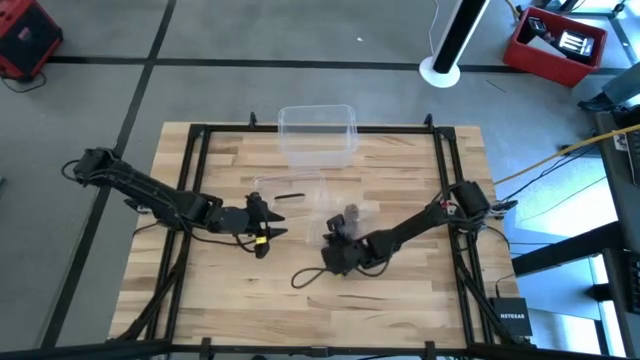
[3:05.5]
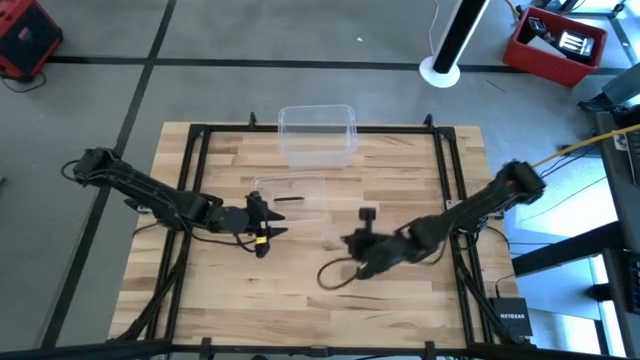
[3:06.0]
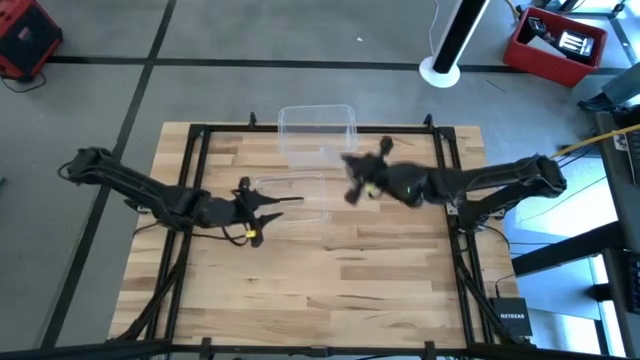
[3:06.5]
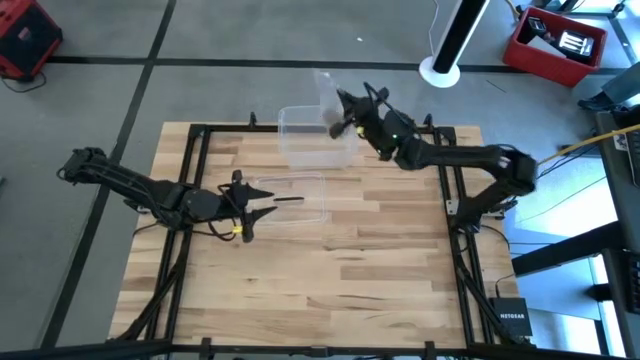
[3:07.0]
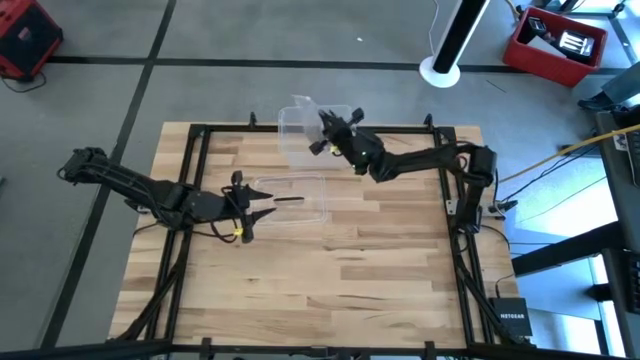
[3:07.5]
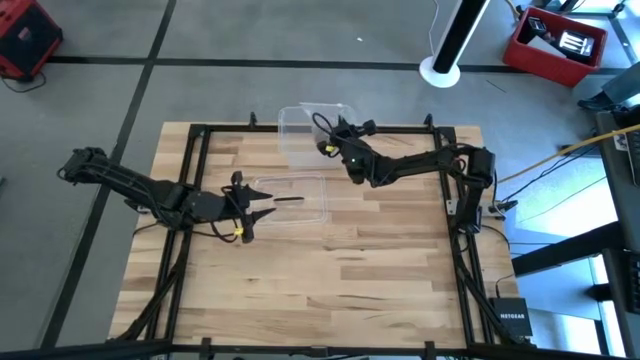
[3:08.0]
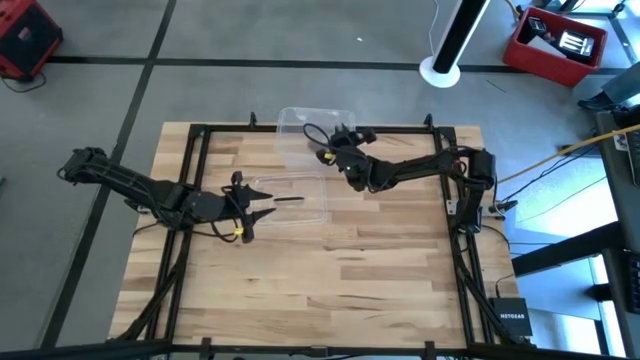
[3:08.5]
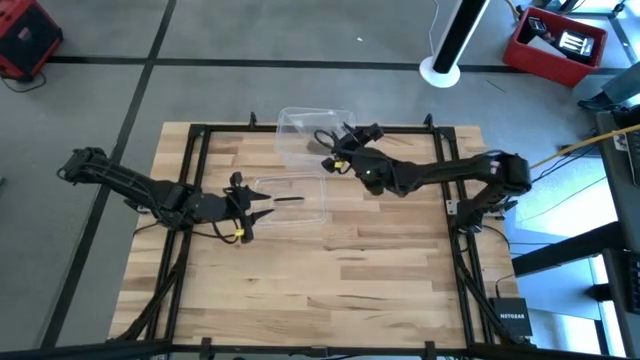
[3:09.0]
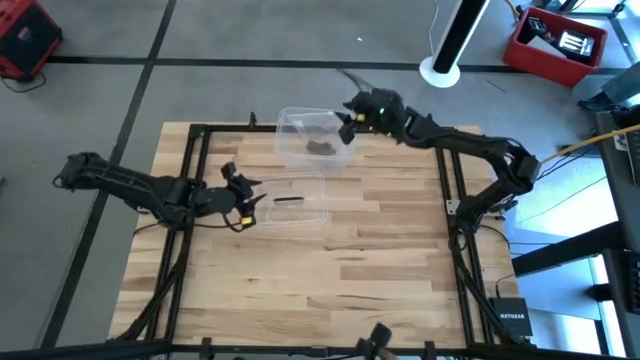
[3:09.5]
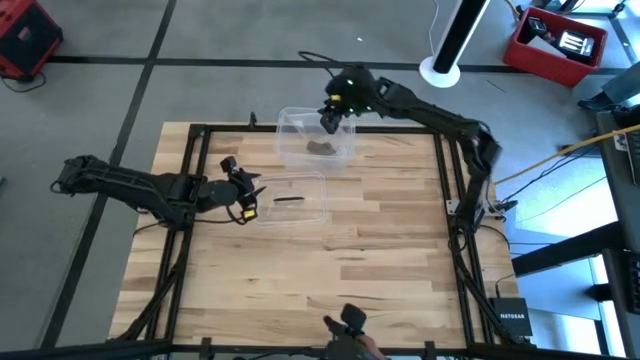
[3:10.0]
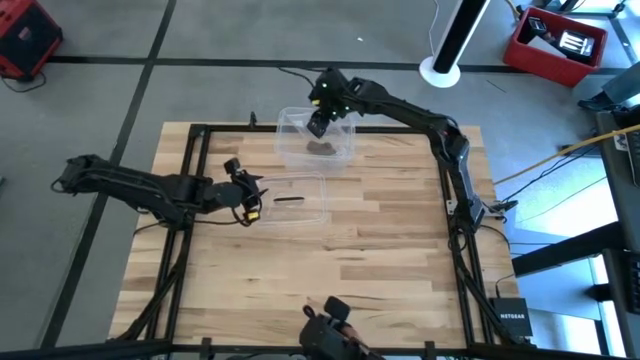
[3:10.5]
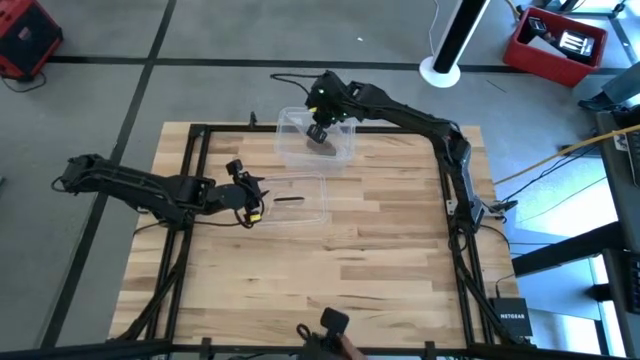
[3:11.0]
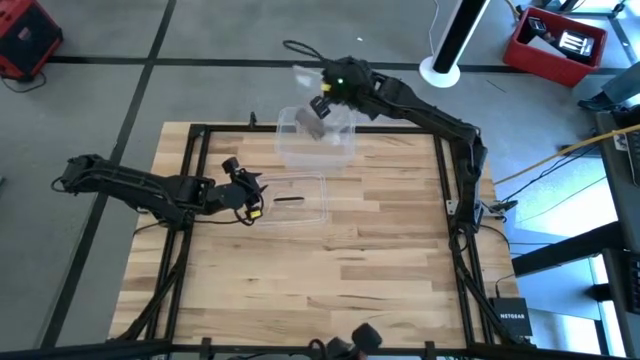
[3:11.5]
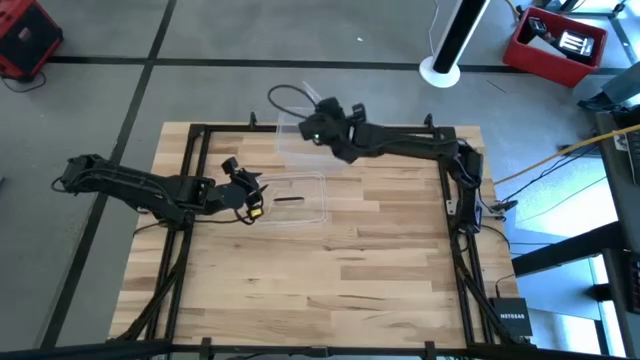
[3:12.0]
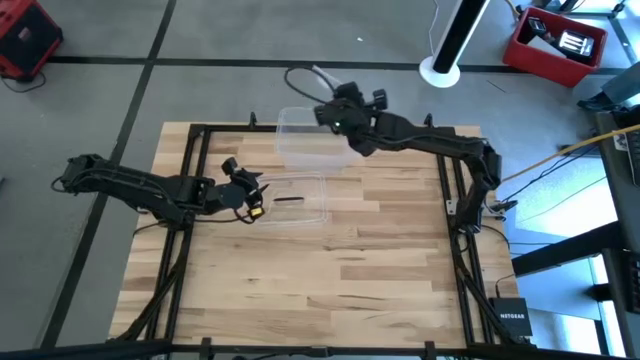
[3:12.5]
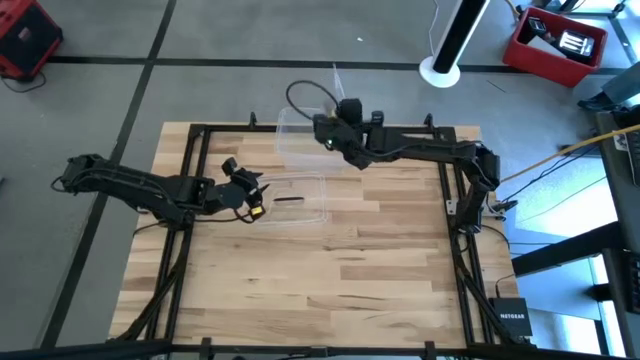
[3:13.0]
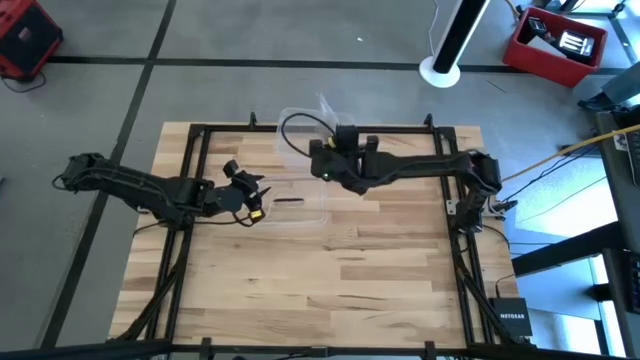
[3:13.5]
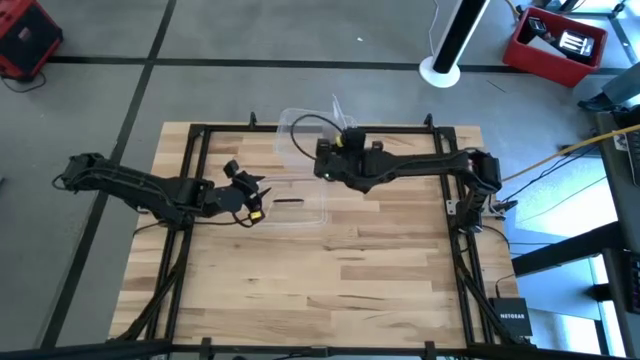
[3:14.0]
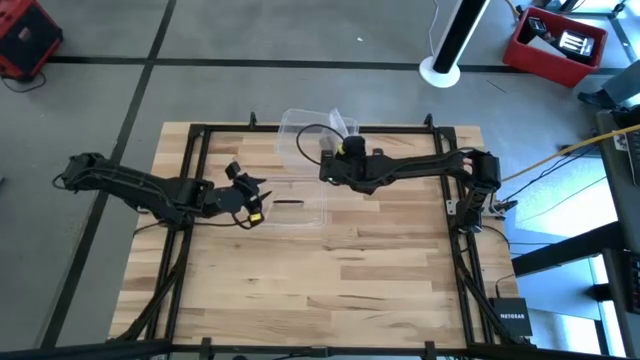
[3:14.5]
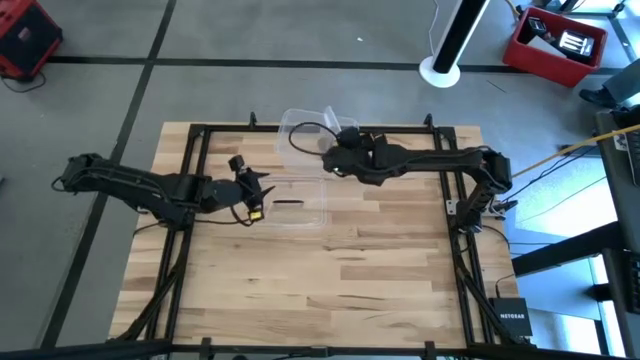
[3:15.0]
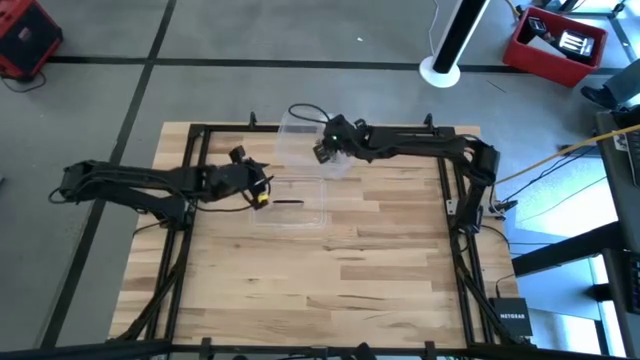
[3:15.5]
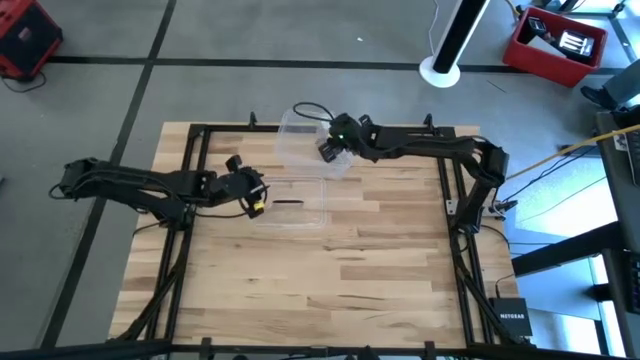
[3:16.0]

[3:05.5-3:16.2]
Task: Roll bandage
Put the transparent zip bag containing the rolled brown bandage into the transparent container

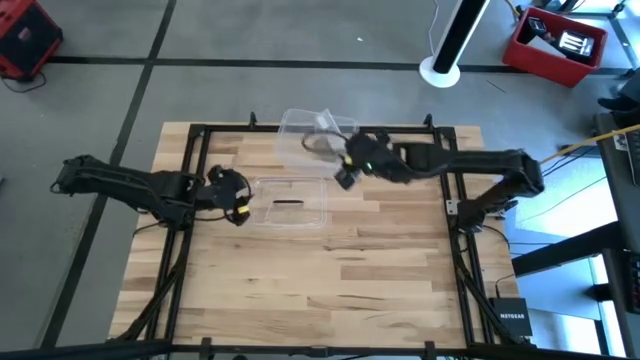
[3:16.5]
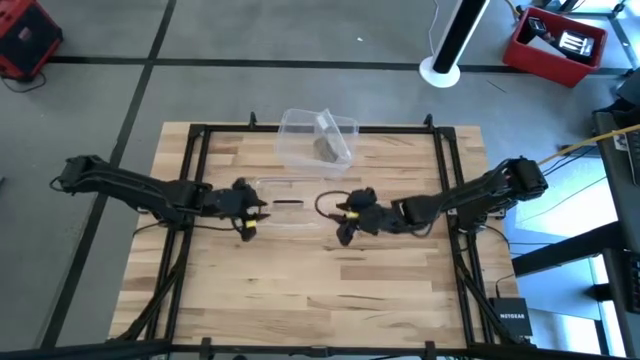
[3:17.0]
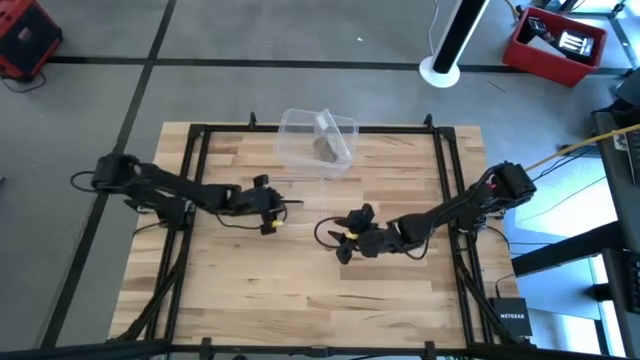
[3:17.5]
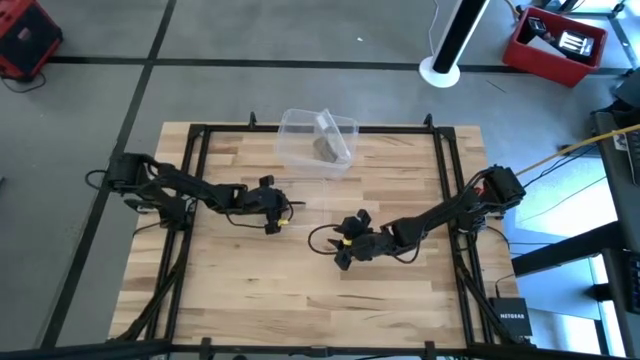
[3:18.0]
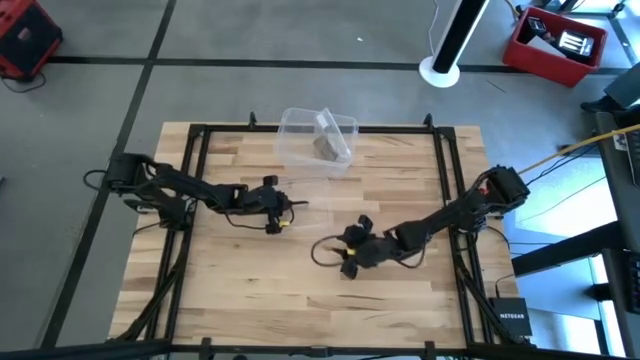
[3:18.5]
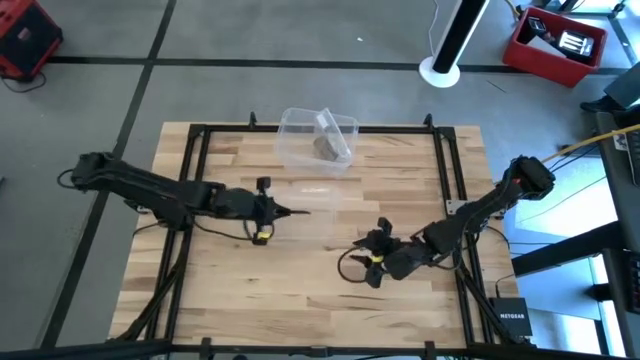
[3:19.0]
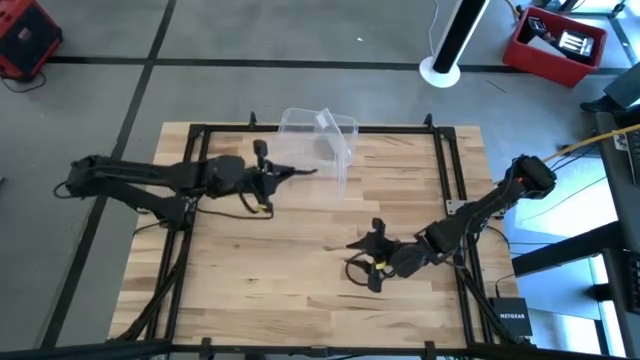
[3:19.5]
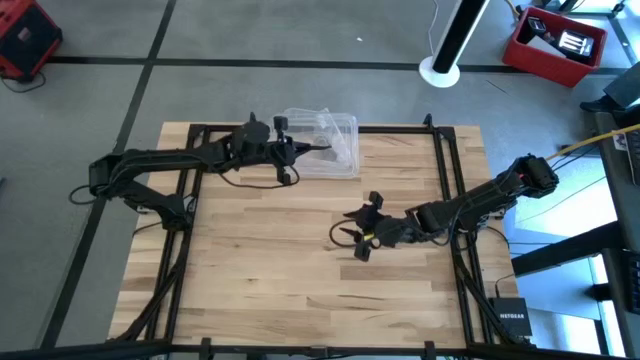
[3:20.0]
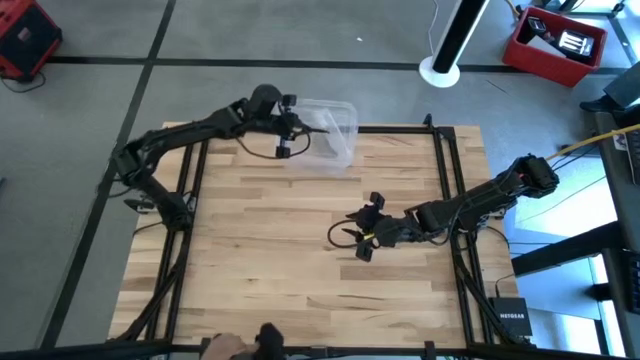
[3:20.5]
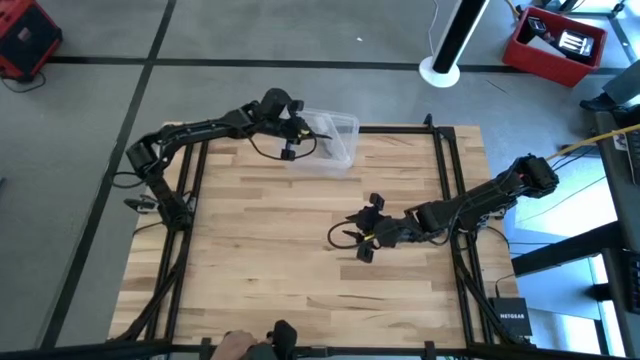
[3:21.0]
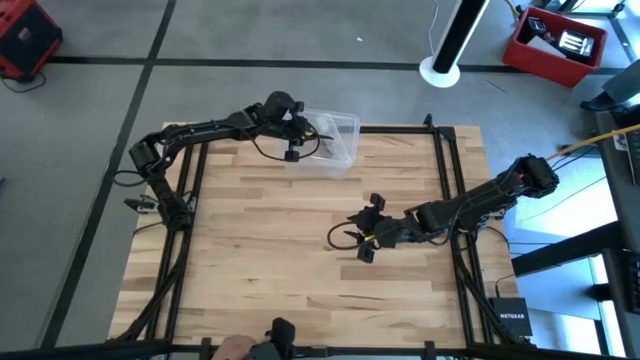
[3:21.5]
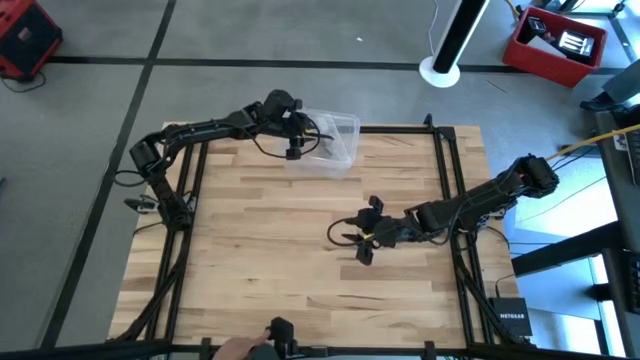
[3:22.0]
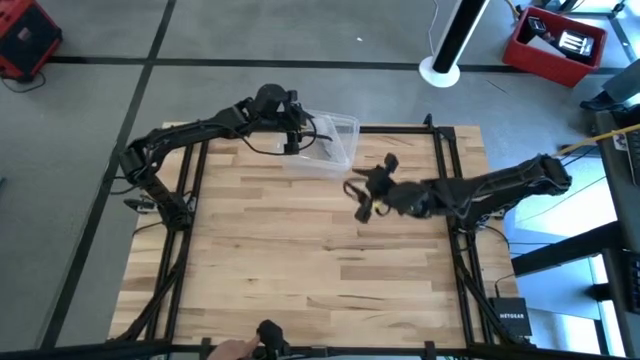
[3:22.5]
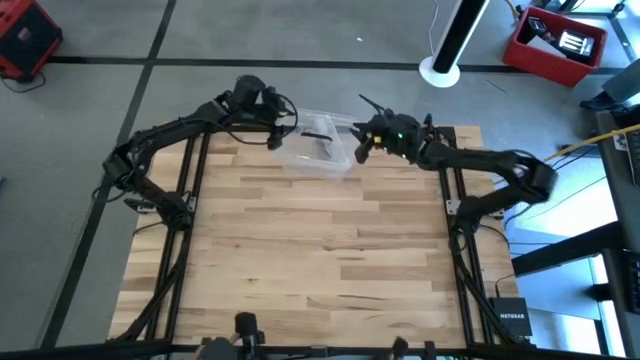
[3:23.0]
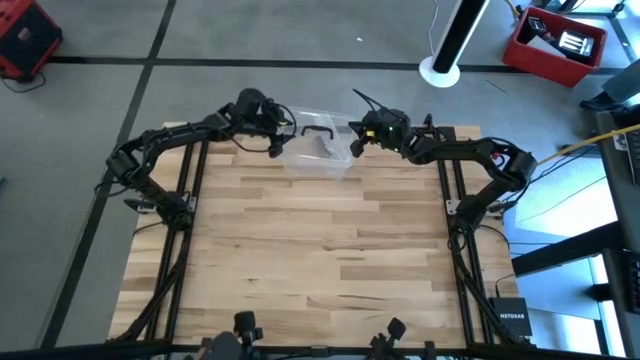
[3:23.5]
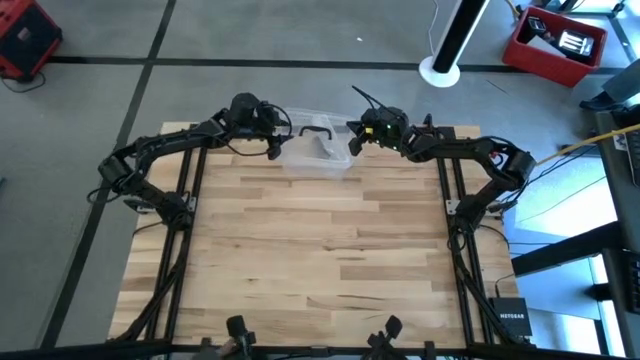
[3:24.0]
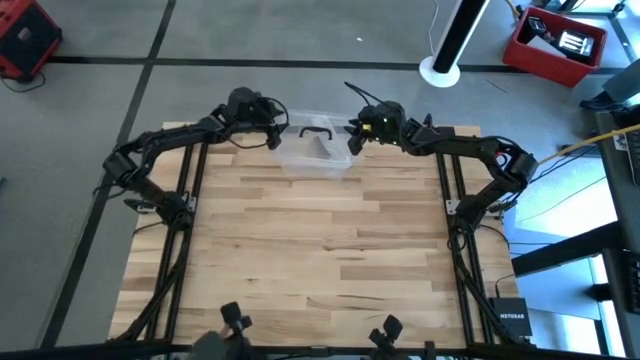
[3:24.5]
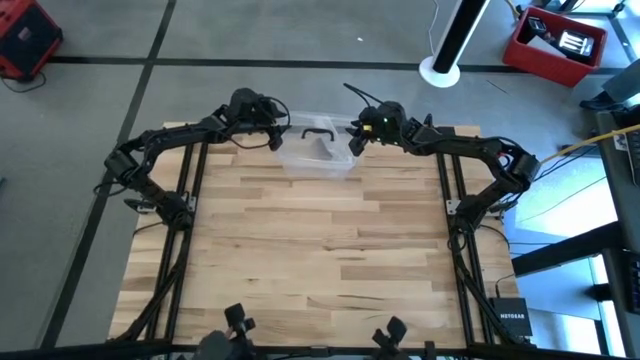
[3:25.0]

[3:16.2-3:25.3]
Close the transparent container
